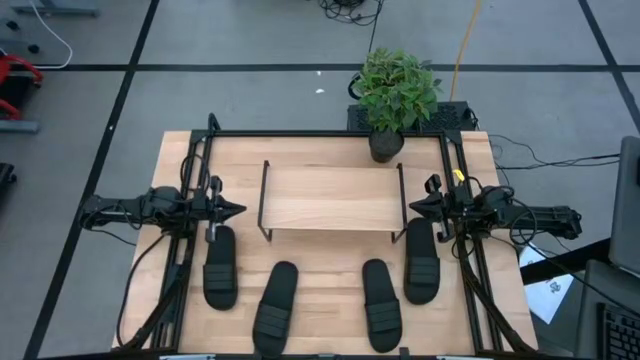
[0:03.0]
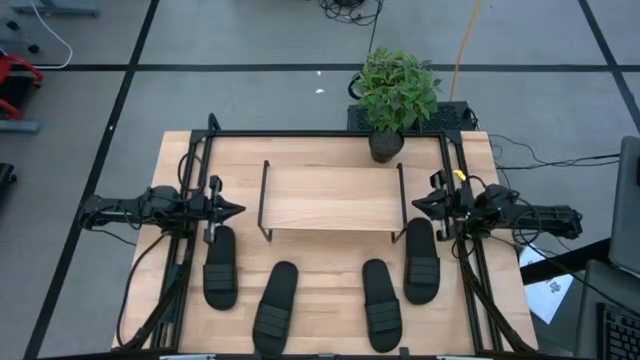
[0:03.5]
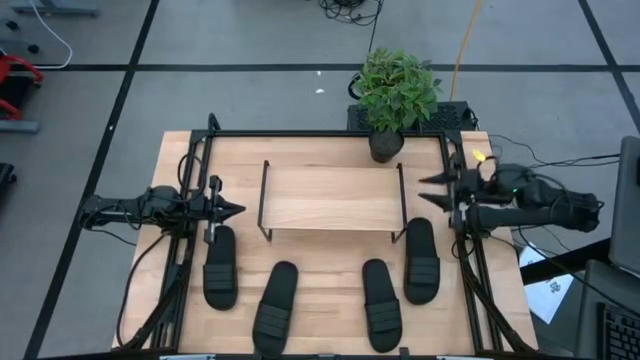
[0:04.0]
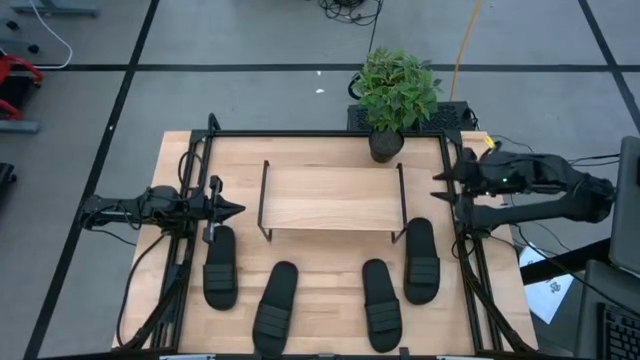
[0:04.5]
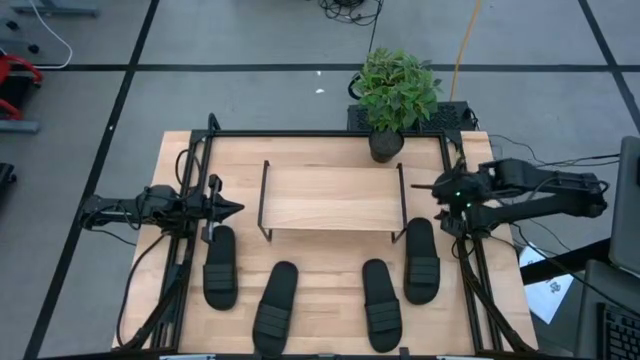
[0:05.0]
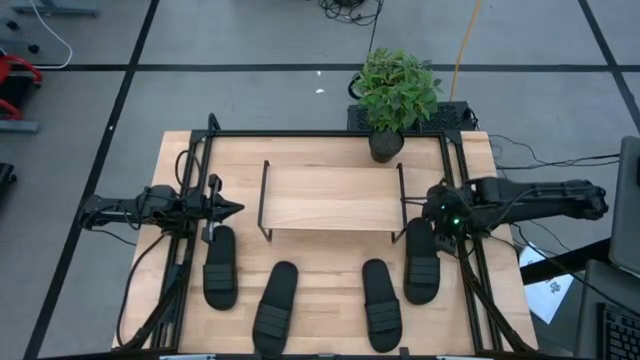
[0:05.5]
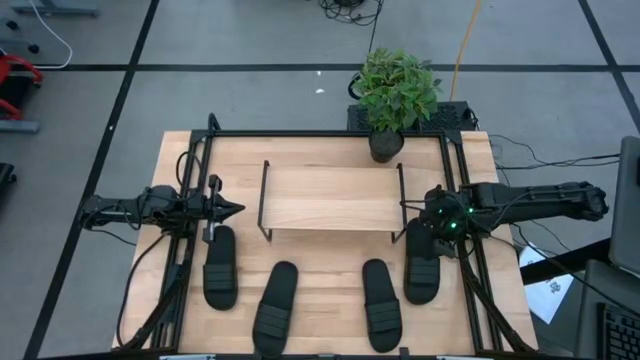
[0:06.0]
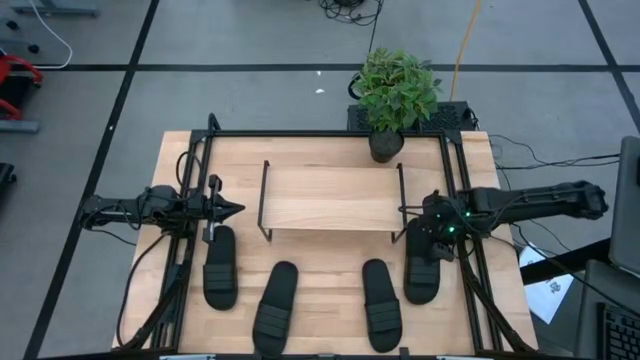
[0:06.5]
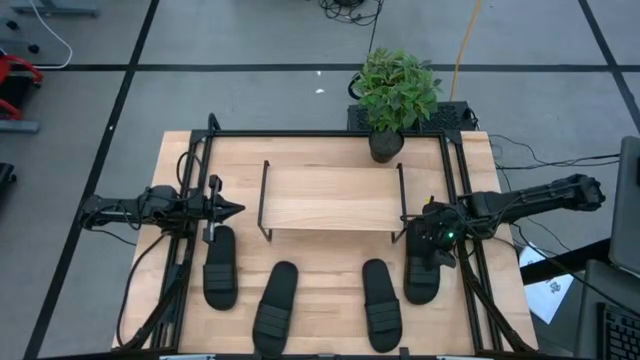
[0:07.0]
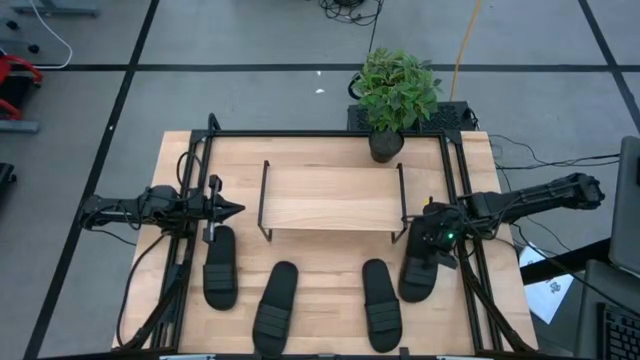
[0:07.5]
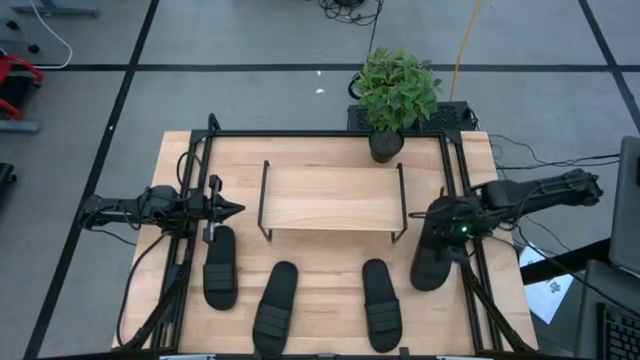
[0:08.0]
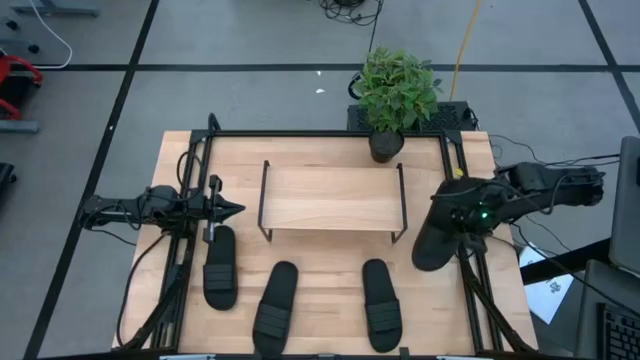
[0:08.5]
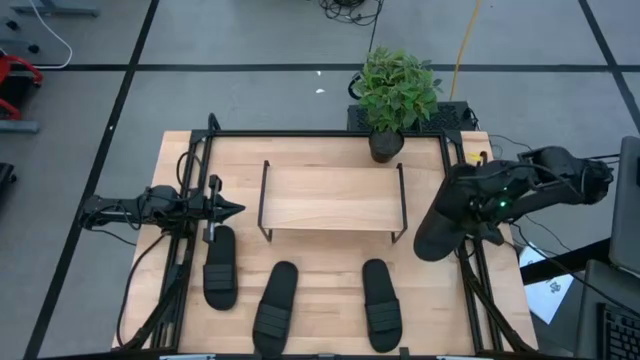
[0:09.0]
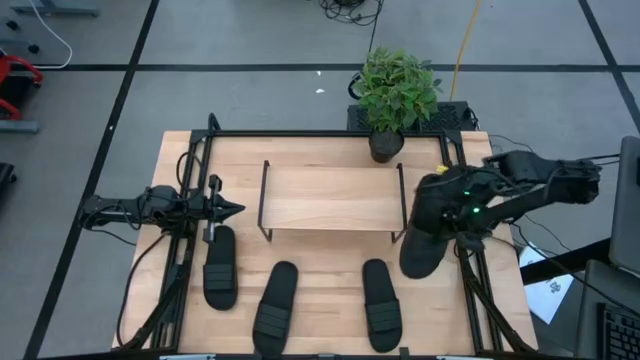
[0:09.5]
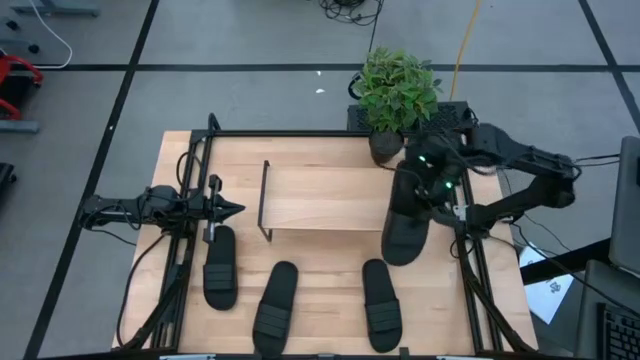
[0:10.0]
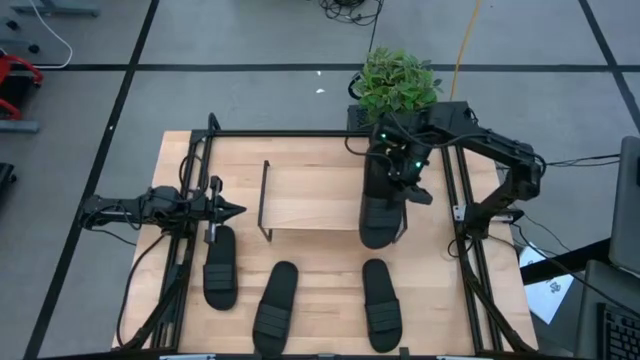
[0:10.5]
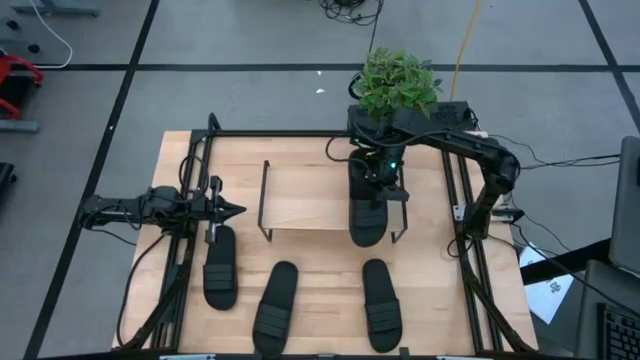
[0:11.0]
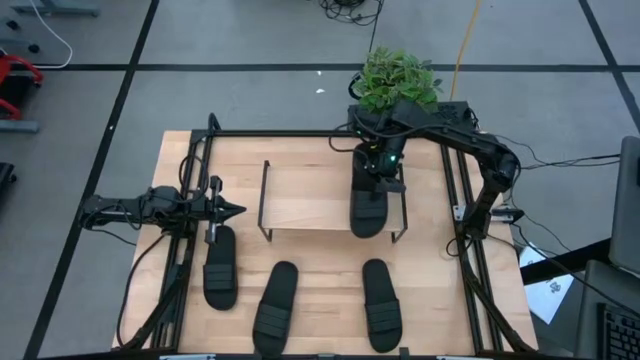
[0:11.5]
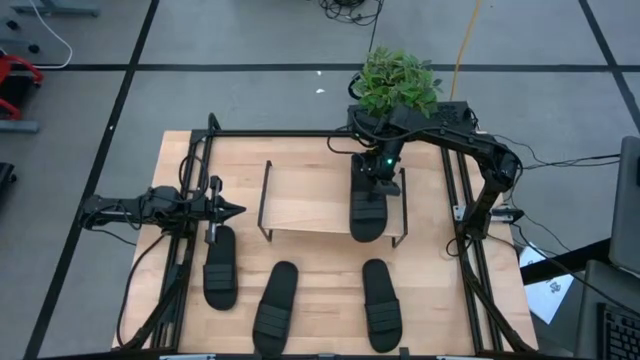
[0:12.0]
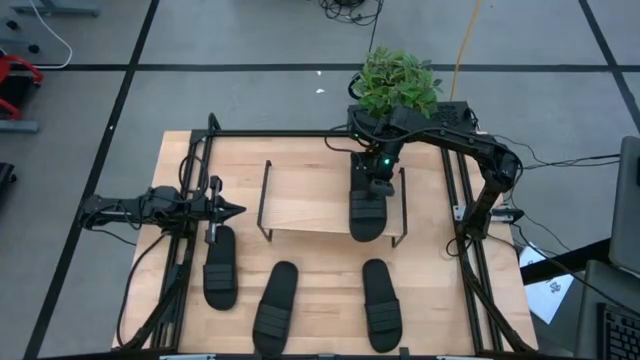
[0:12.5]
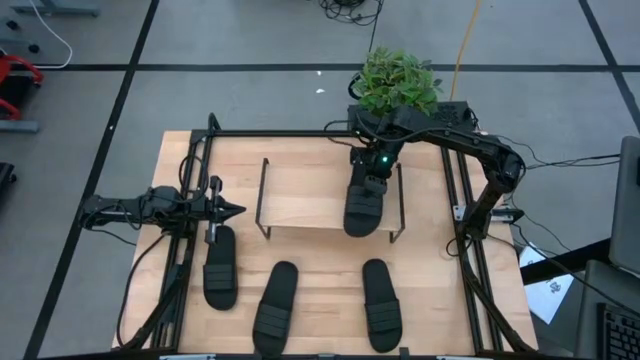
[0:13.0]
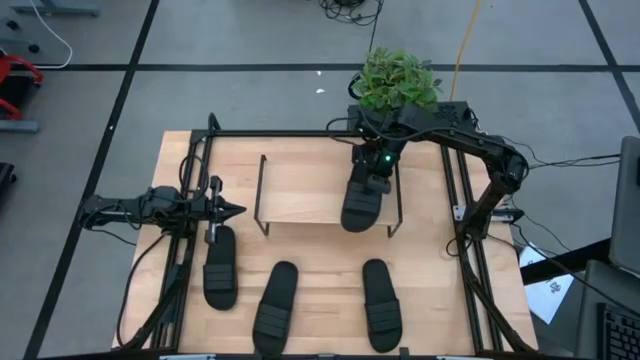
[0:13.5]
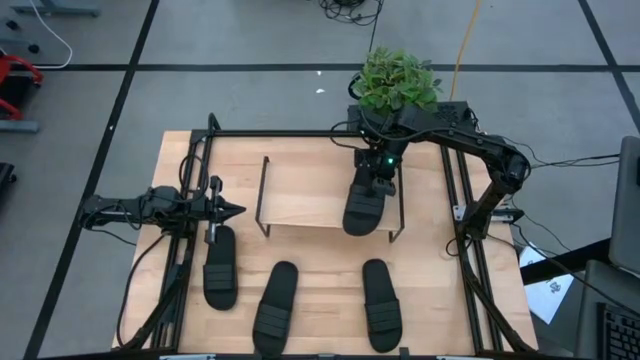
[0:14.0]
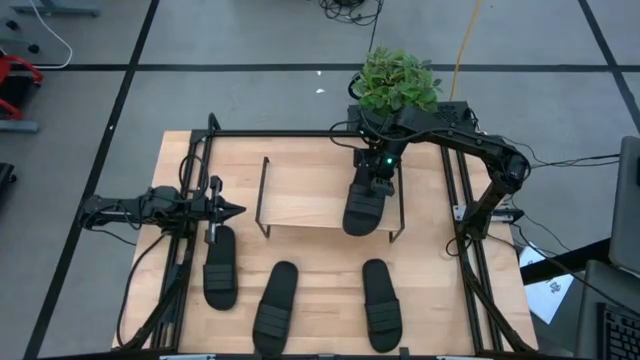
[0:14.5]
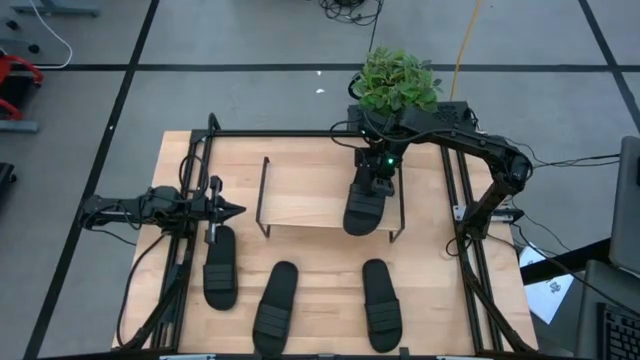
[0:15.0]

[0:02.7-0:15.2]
Task: Pick and place slides into the shelf
Put the top right black slide on the shelf

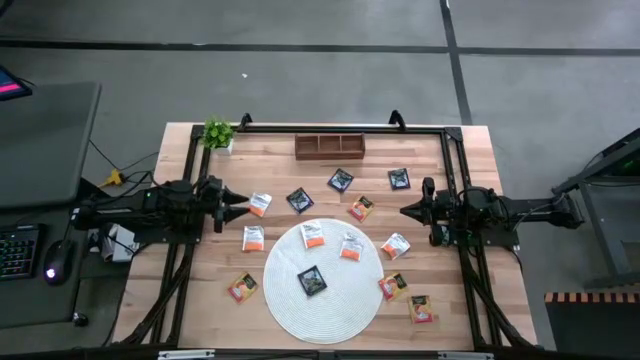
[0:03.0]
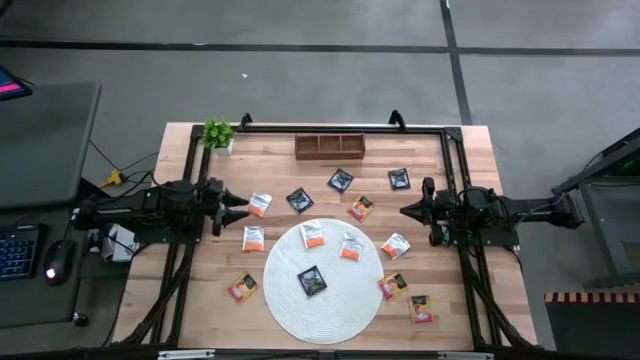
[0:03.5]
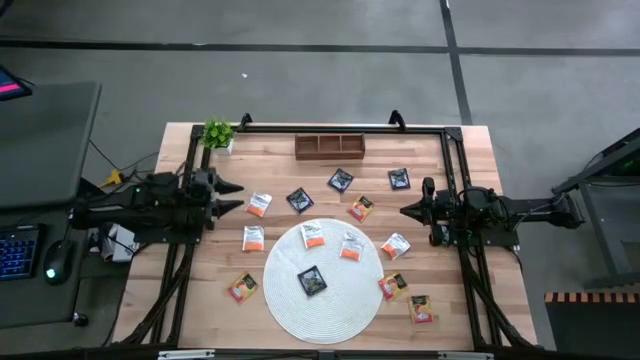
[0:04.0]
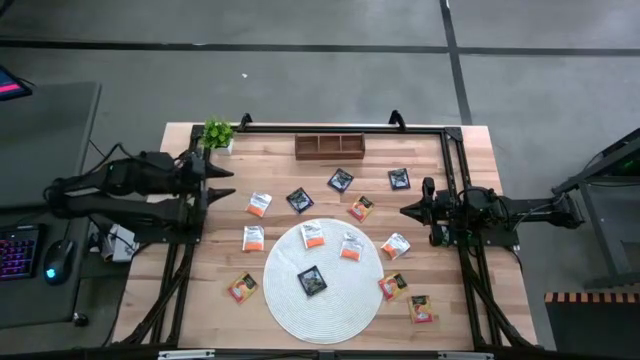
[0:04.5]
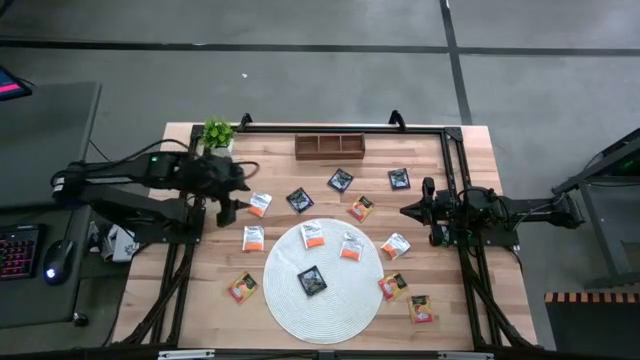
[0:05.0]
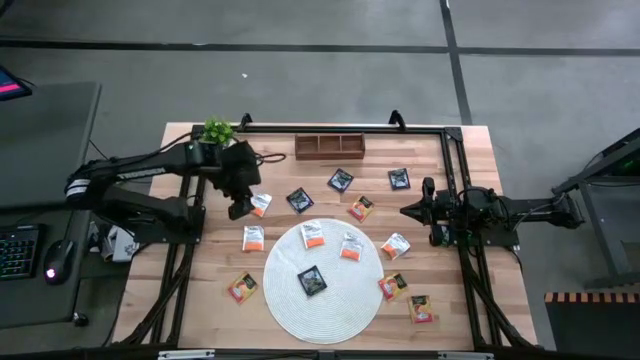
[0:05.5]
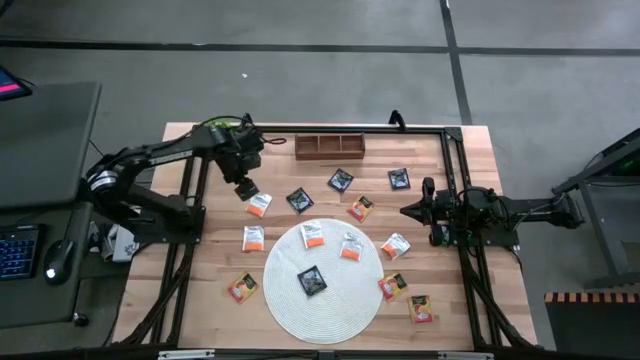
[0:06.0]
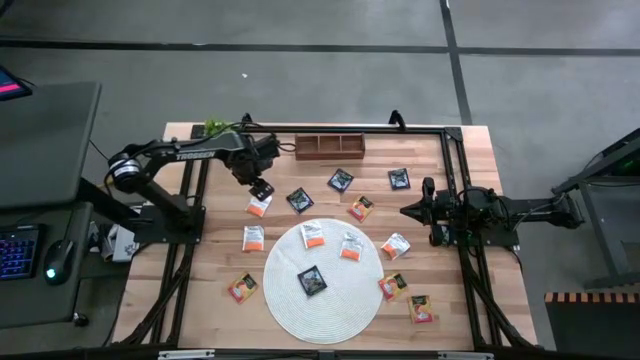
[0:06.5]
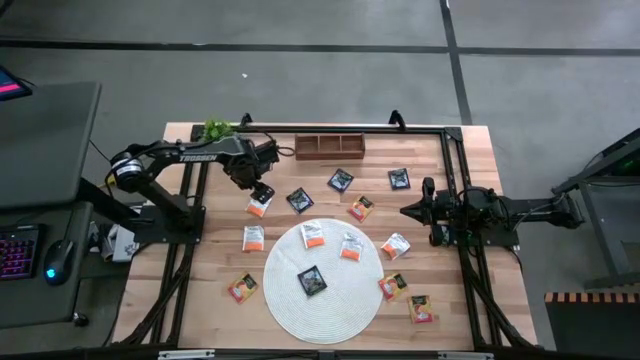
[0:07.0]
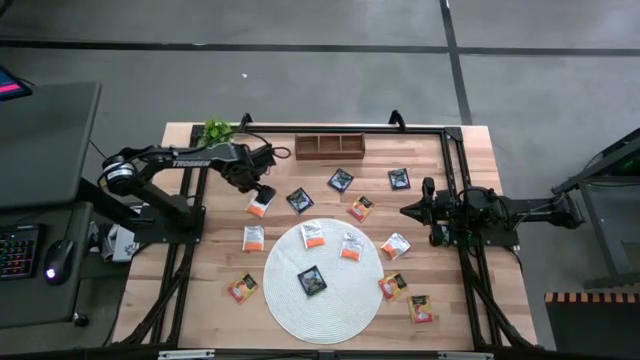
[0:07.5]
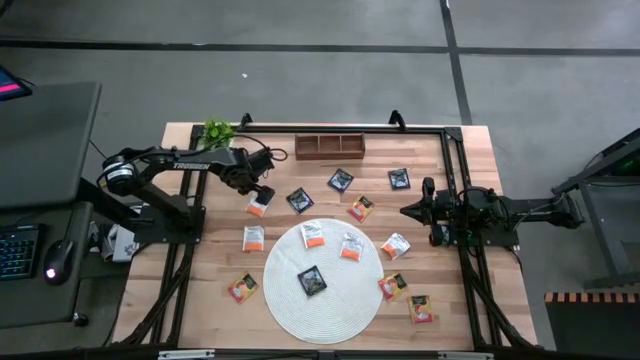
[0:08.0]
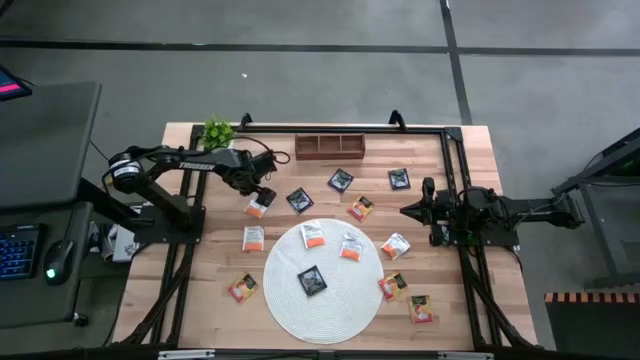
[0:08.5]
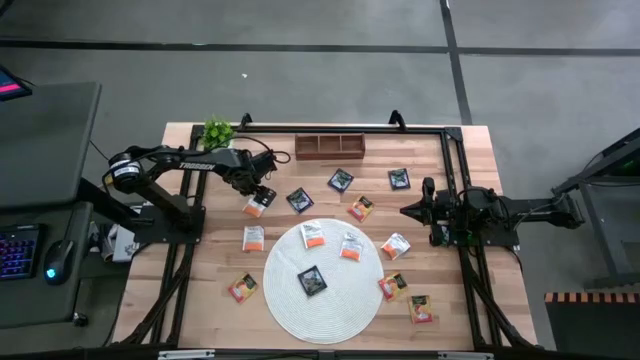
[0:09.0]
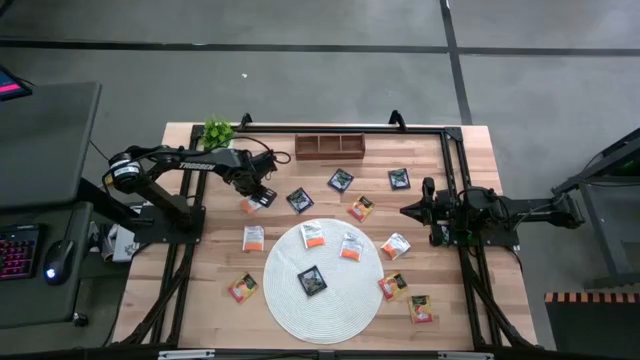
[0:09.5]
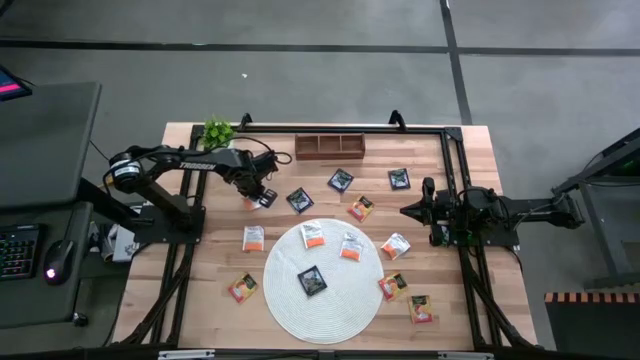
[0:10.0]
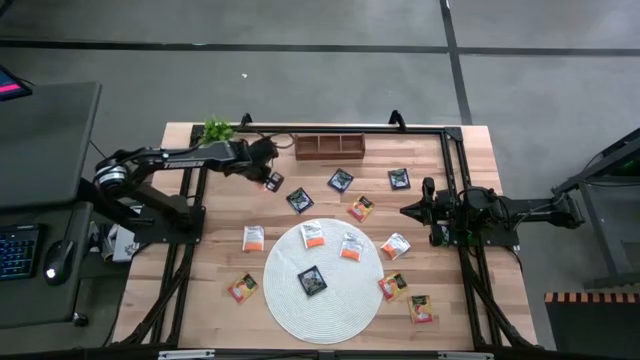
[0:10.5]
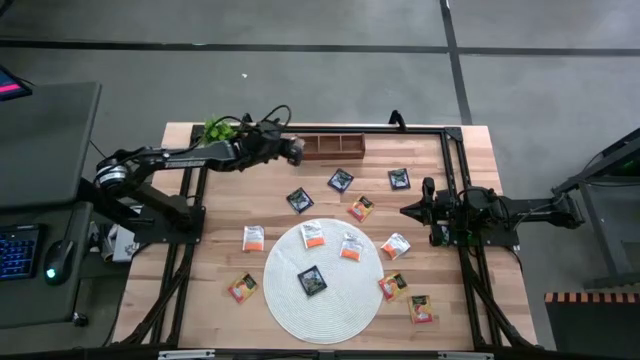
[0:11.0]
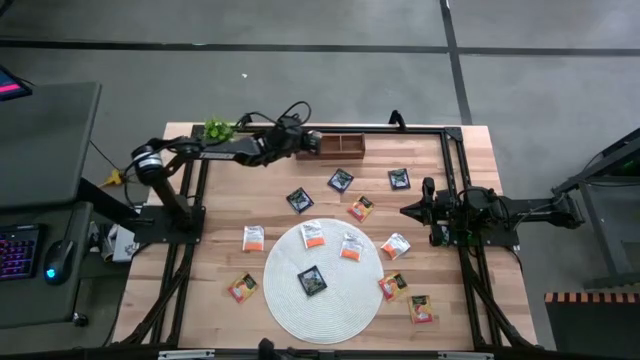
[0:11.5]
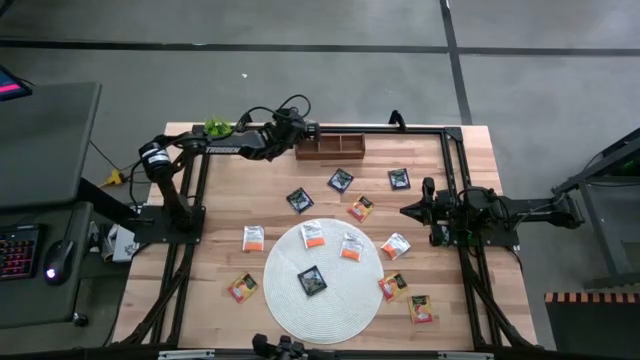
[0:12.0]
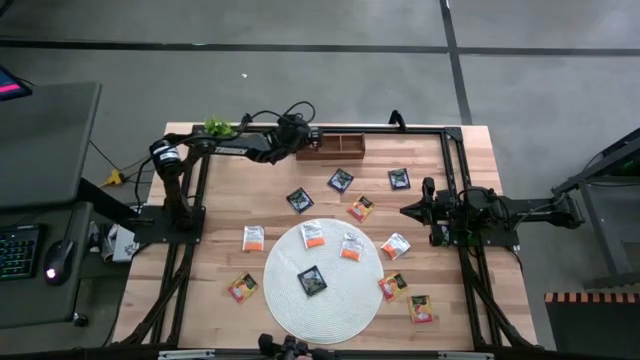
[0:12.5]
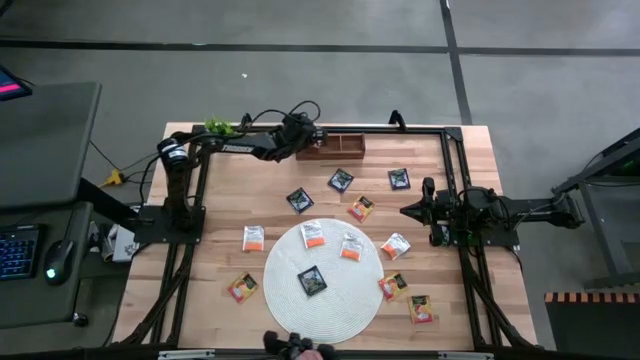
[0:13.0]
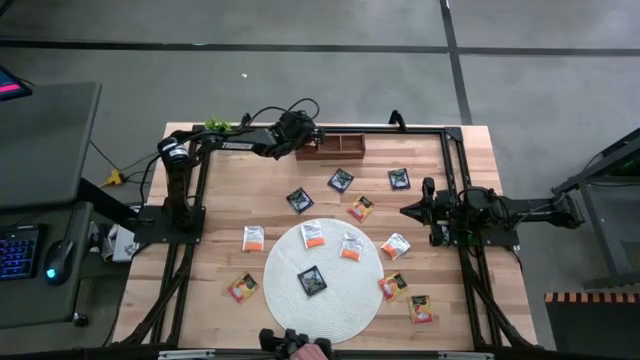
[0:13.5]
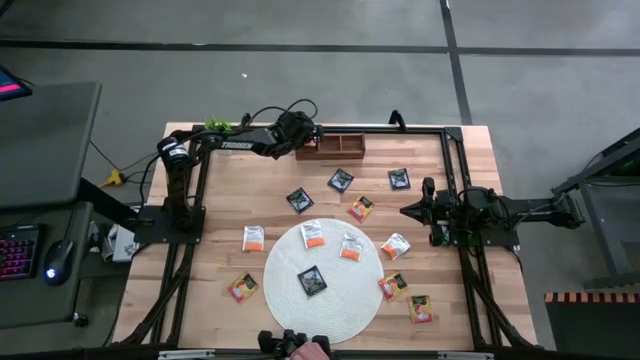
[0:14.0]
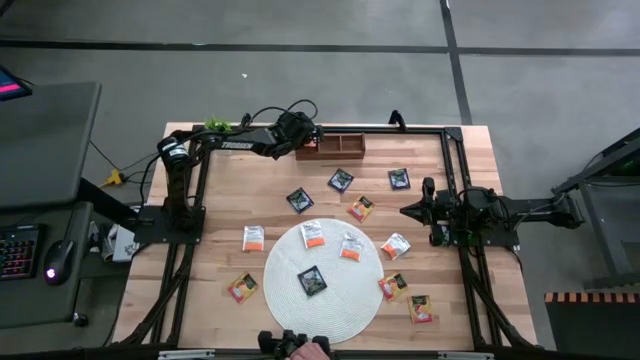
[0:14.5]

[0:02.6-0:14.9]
Task: Pick & Place Tea
Put the white tea bag into the left section of the wooden organizer
